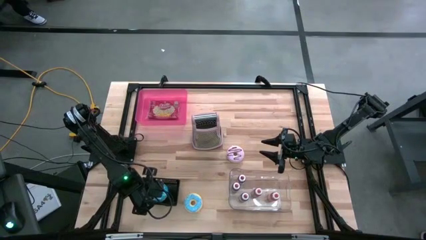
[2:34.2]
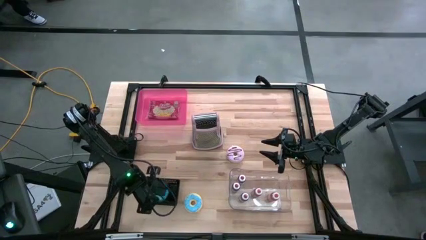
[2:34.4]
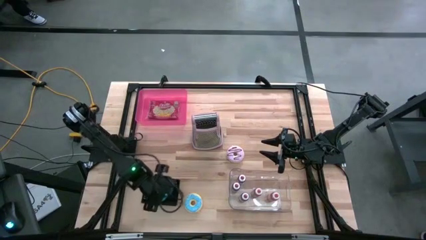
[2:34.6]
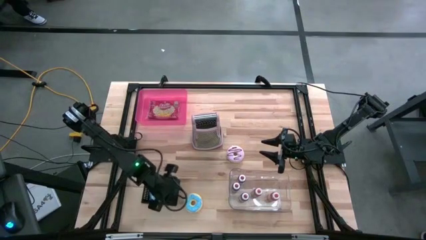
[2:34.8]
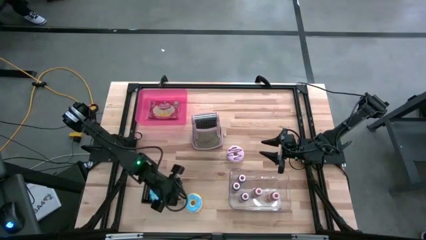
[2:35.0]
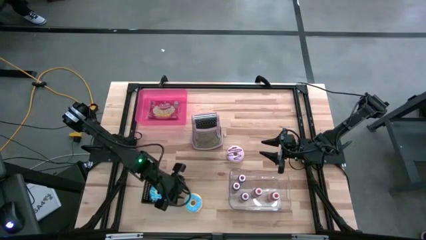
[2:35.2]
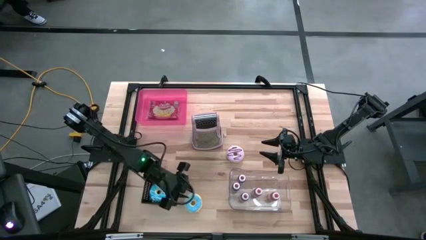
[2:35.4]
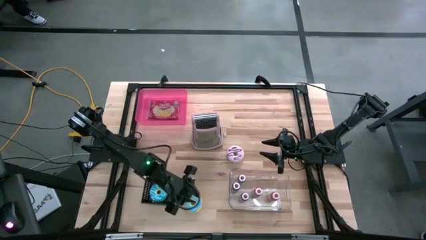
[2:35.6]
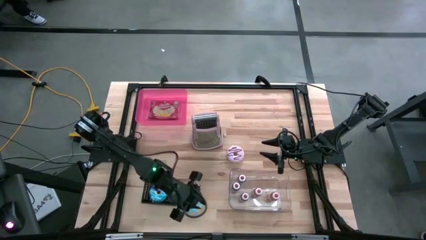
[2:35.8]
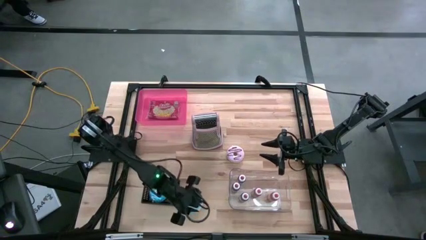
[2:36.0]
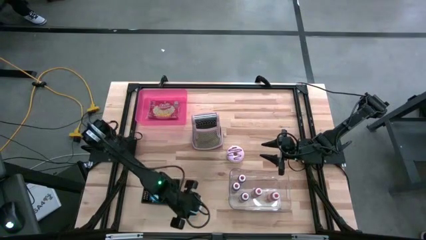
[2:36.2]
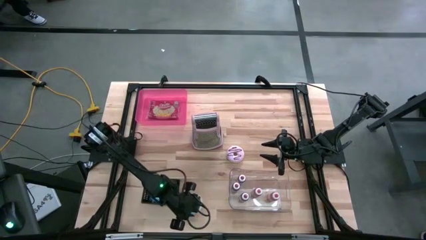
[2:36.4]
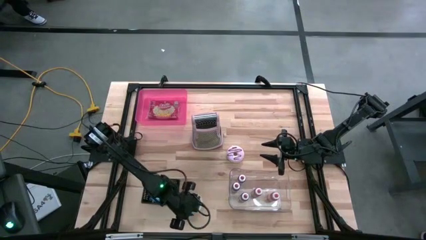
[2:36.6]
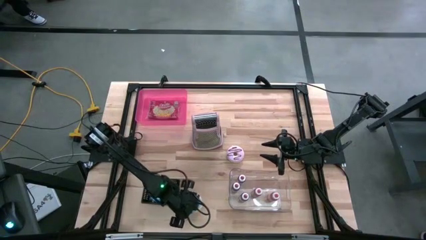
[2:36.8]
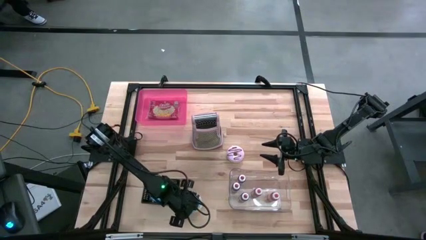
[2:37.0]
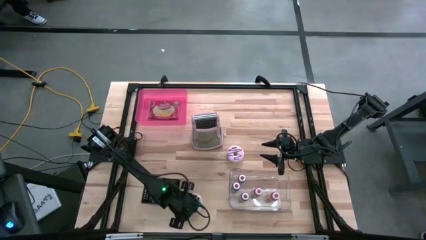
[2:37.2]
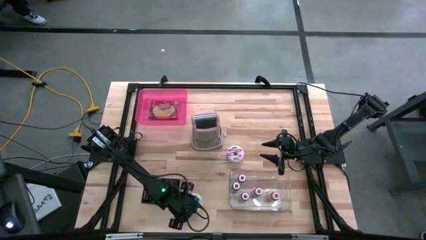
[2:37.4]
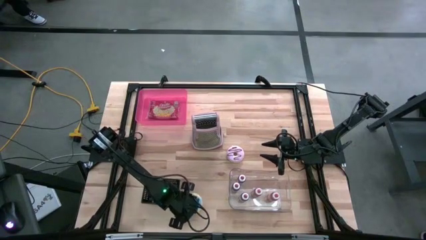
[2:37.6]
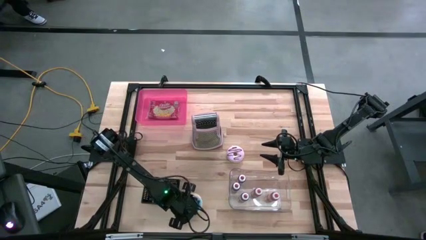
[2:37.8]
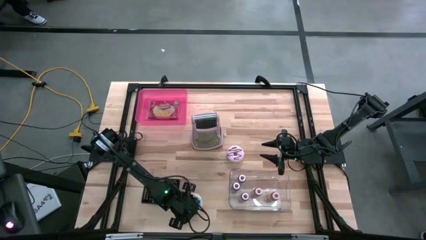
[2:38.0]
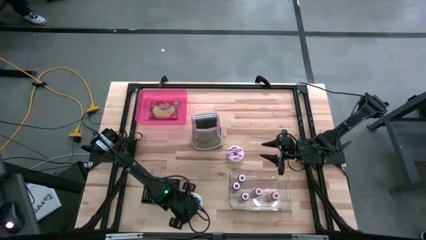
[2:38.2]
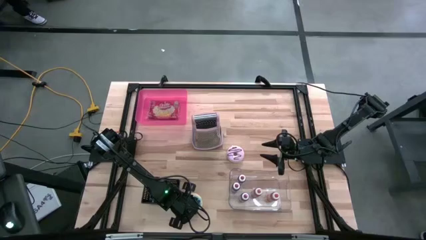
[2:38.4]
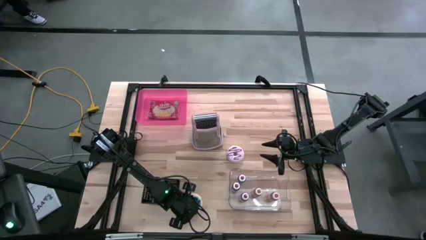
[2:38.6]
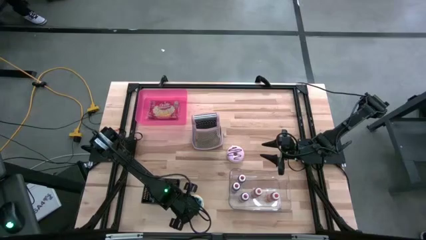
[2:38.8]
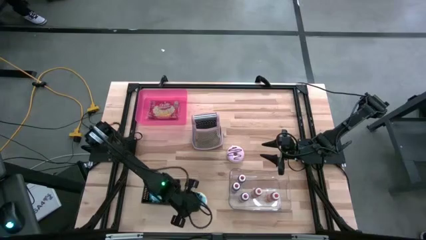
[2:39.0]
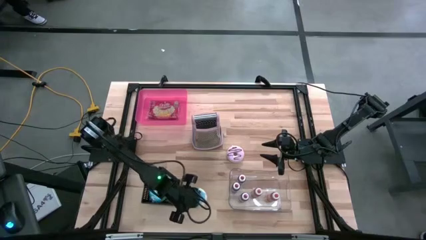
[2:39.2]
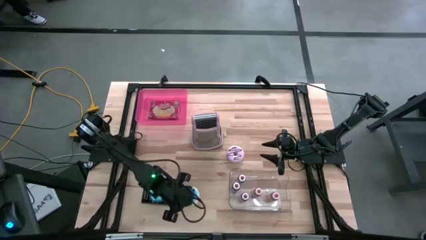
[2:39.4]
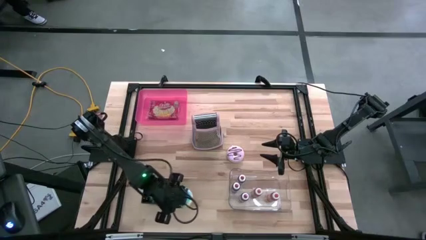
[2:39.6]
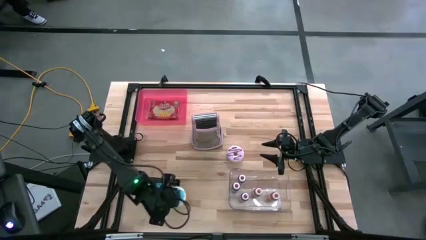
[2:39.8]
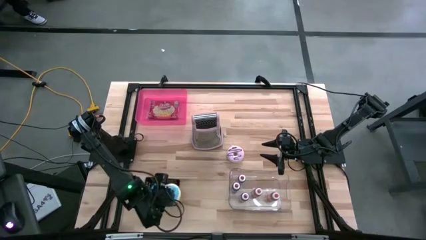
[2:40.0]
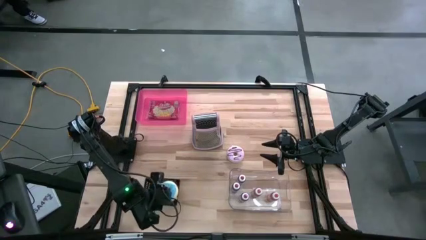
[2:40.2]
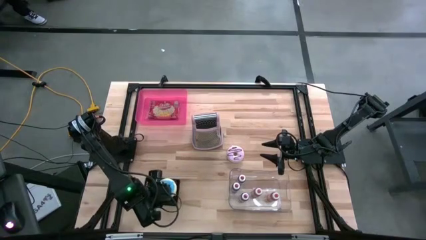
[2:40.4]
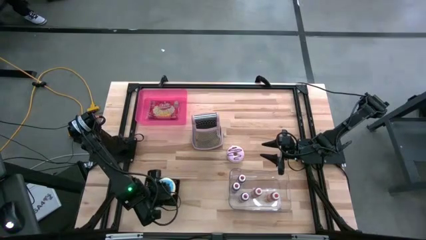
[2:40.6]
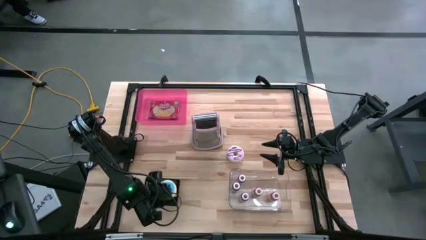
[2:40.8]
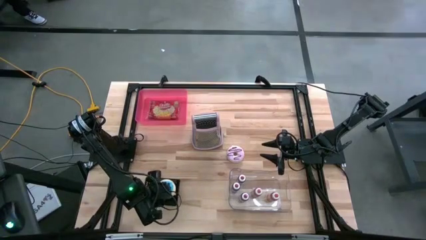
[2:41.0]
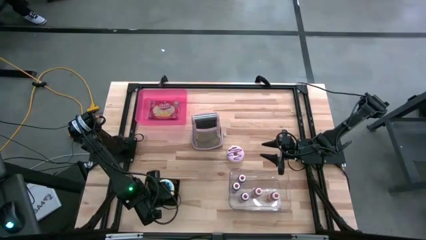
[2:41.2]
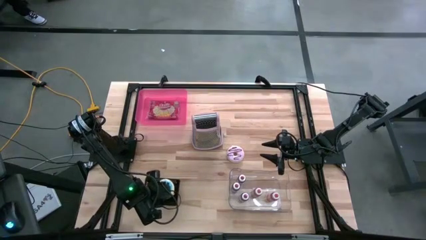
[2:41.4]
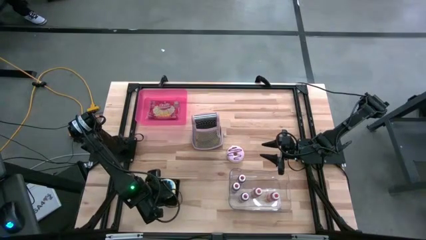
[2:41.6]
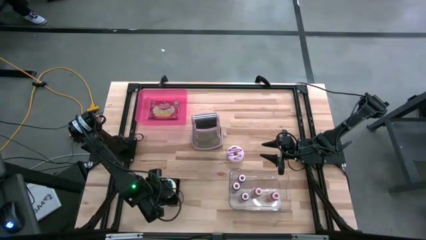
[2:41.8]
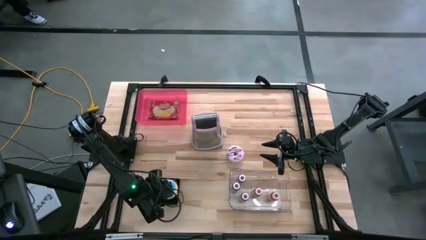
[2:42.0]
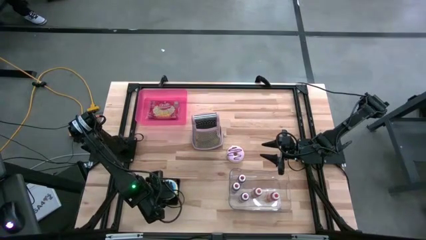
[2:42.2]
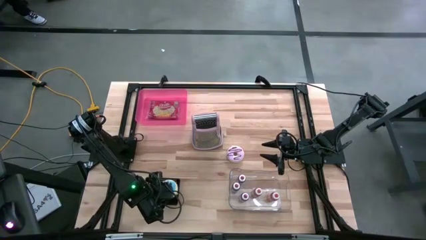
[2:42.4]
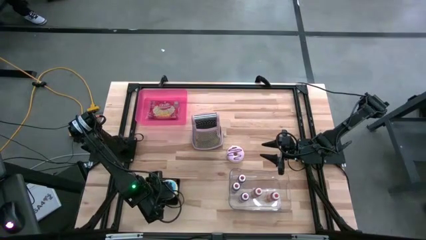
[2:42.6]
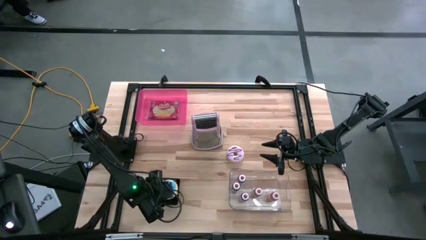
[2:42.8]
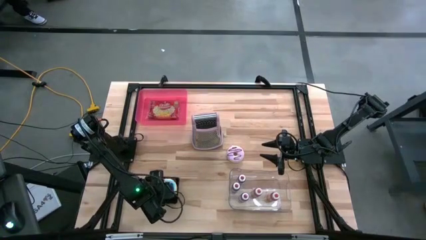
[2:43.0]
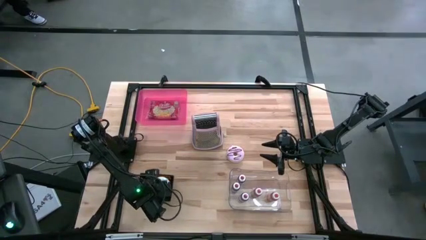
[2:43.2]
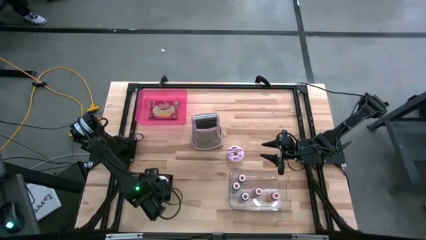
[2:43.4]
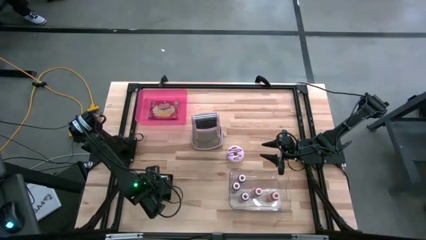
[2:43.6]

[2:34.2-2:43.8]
Task: Pick & Place Food Item
Put the blue donut into the black bin

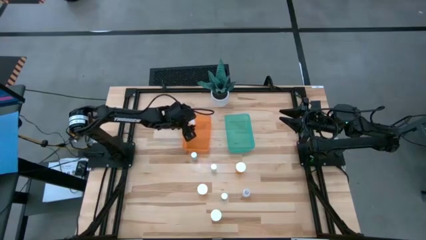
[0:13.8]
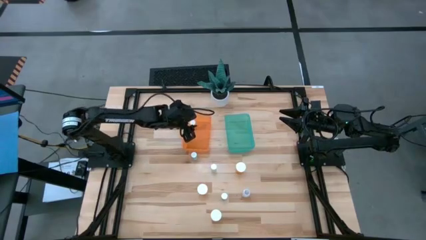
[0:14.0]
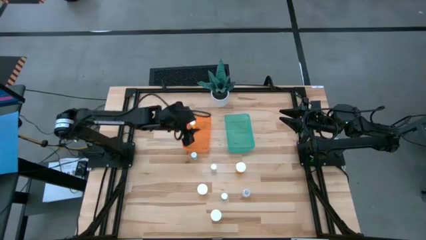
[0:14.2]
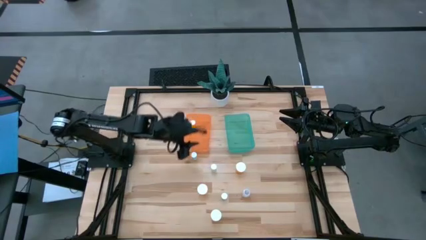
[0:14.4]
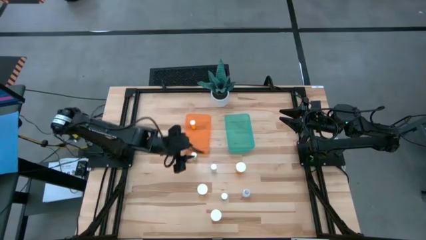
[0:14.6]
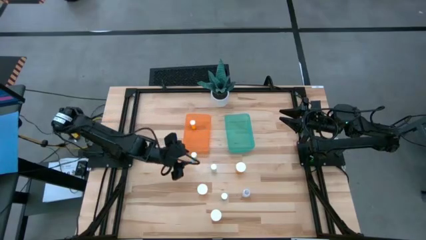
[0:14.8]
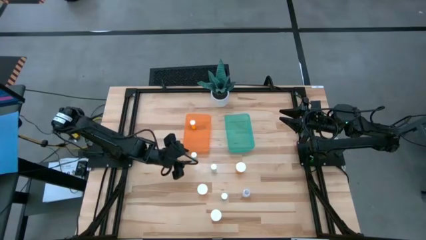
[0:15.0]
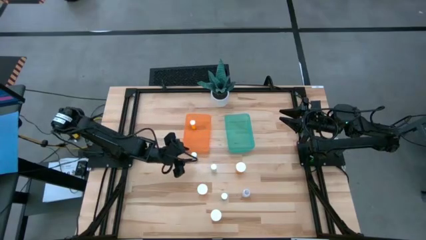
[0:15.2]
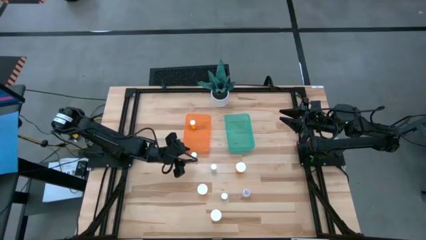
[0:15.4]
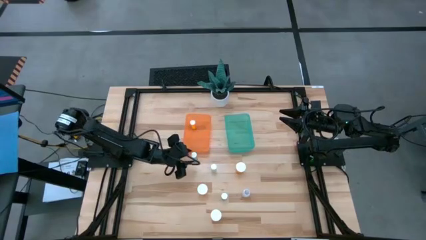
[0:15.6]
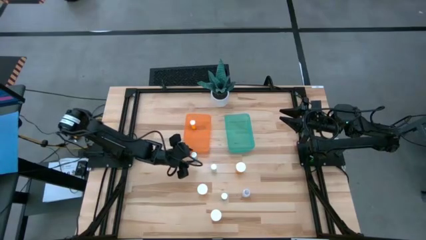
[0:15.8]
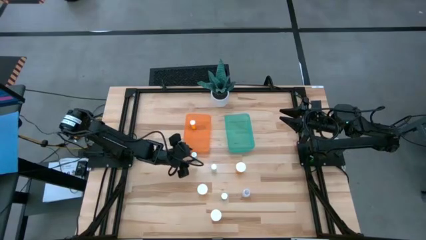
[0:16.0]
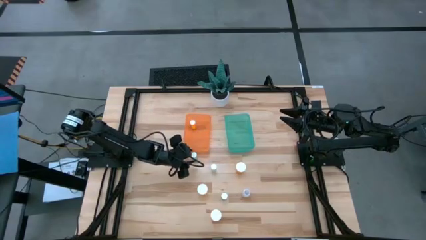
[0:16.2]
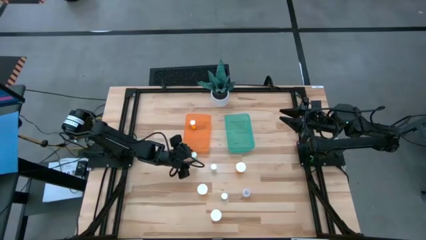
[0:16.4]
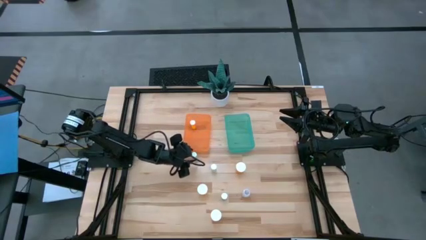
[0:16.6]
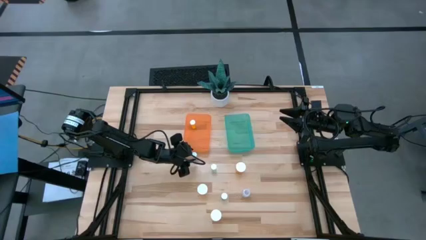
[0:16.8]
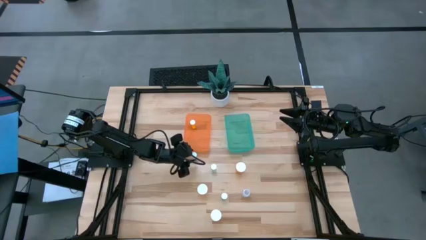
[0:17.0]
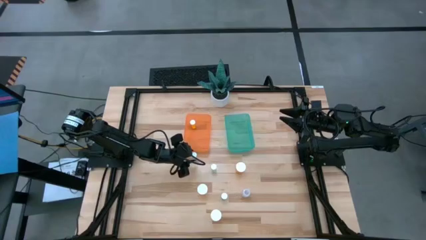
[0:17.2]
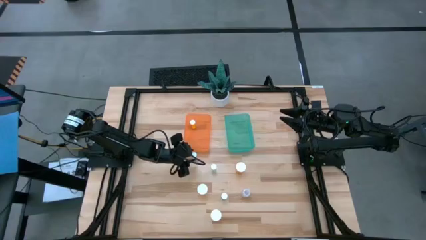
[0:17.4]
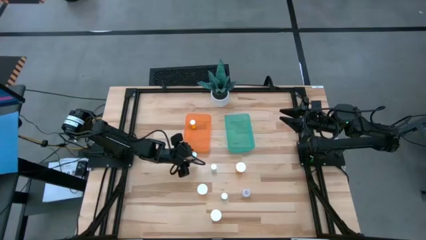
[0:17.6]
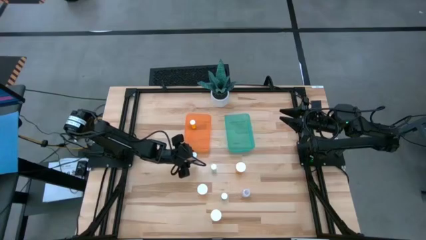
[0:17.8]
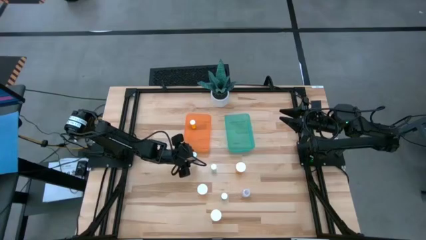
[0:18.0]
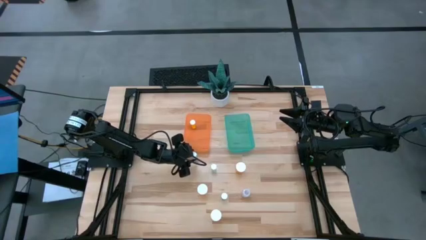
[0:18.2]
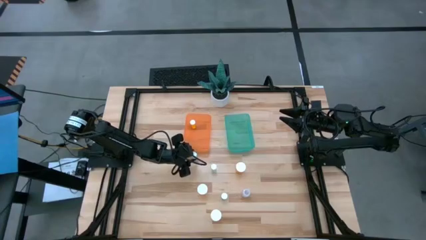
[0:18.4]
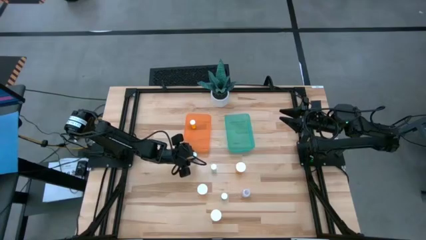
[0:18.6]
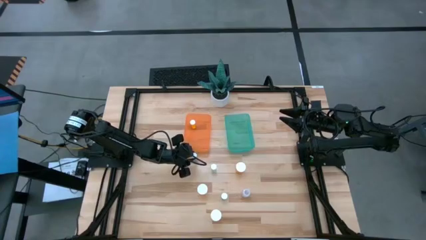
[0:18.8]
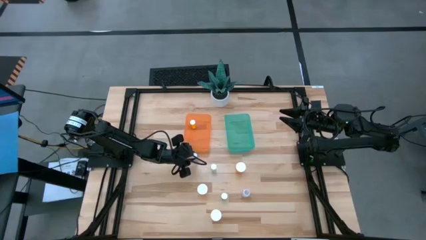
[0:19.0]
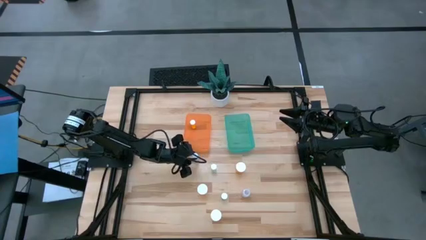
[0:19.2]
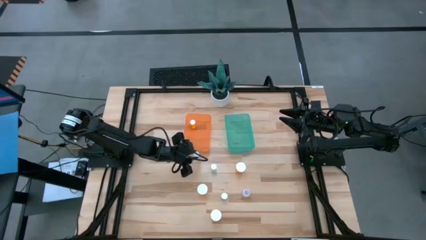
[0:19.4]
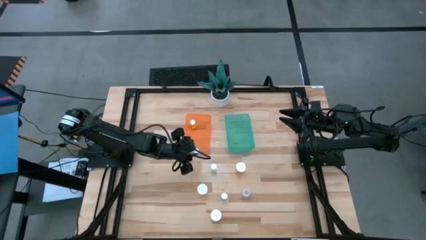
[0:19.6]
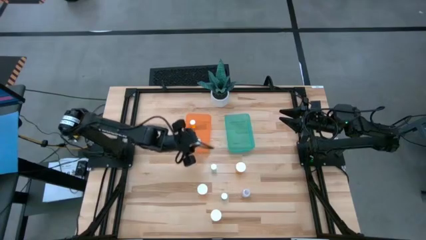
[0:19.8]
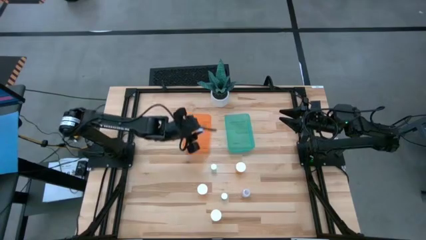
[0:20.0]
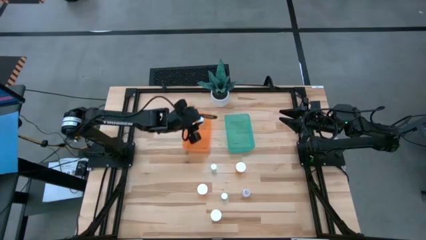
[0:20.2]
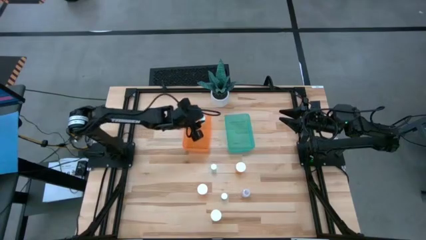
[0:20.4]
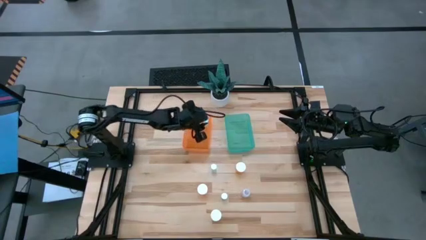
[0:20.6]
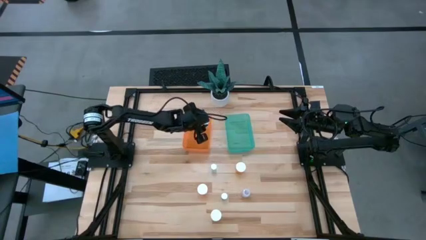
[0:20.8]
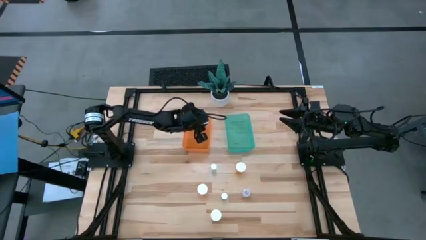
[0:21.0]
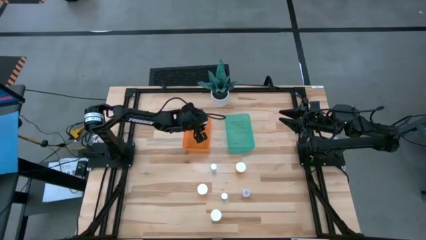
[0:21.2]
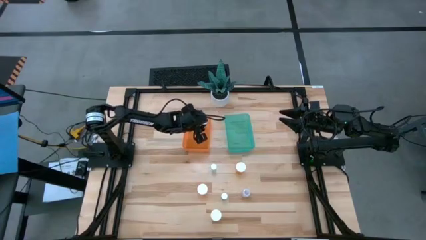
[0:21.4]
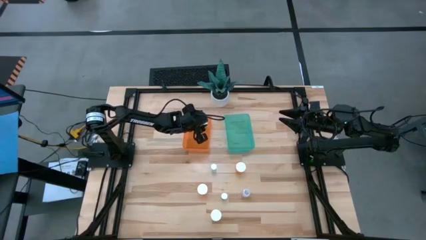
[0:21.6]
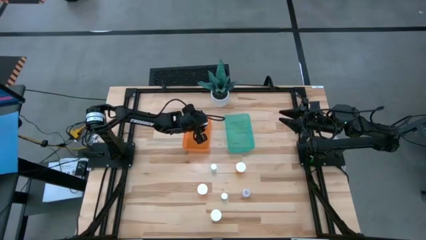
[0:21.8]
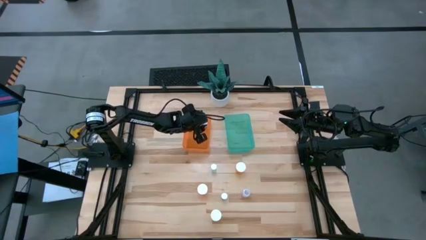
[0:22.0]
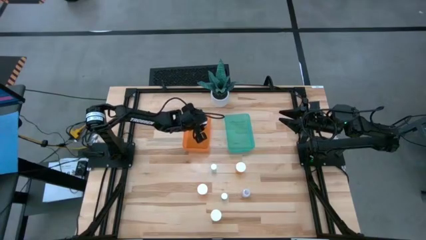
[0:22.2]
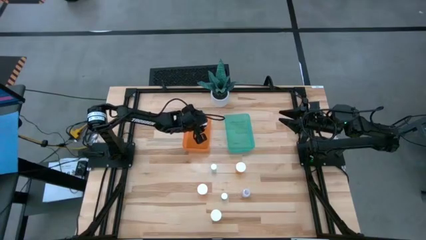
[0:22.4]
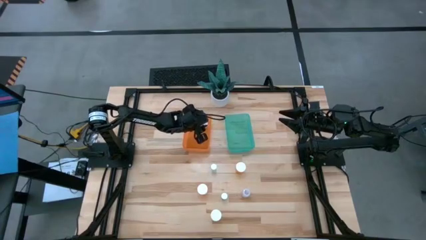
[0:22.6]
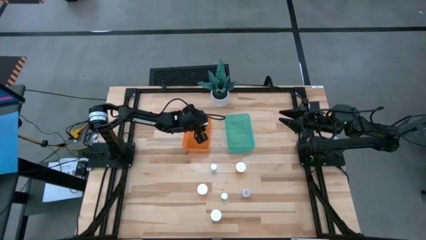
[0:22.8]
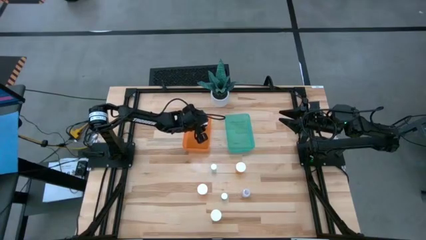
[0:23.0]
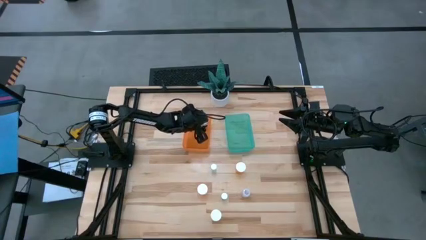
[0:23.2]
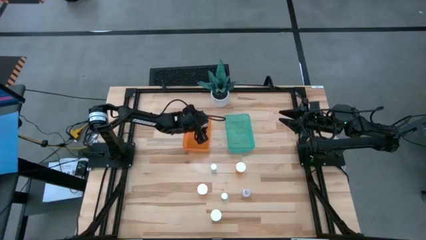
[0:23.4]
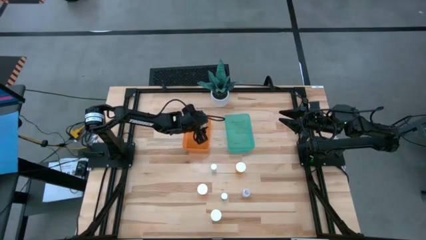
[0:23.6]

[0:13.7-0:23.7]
Task: Pick and place medicine bottles into bin by pill shape (circle, oval)
Put the top left blue pill bottle into the orange bin
